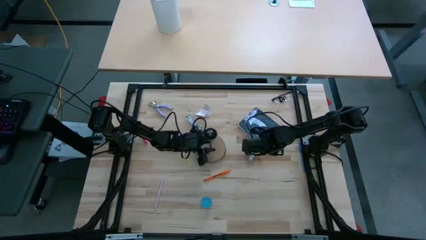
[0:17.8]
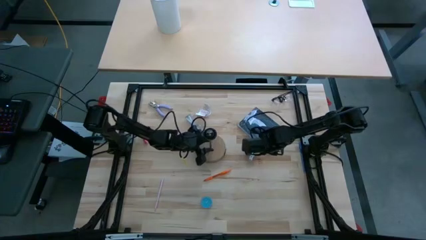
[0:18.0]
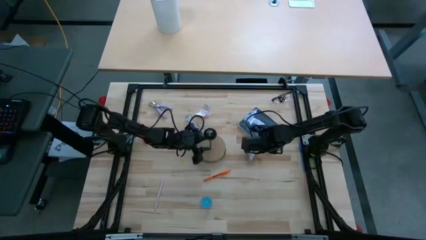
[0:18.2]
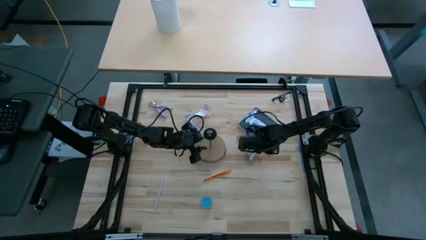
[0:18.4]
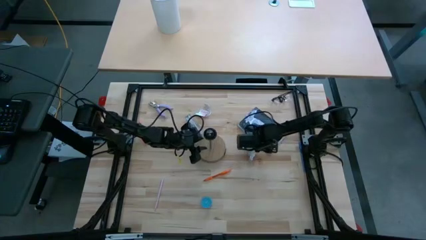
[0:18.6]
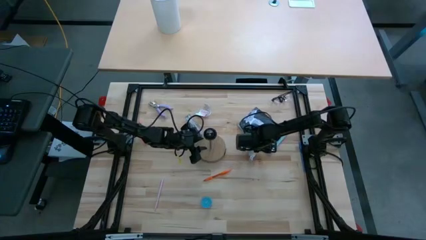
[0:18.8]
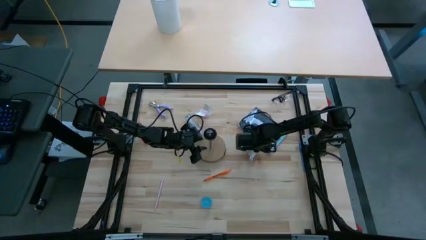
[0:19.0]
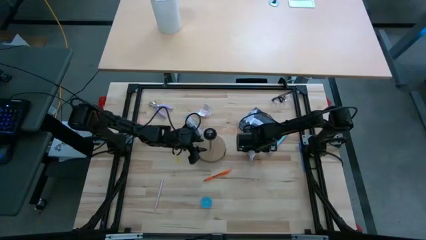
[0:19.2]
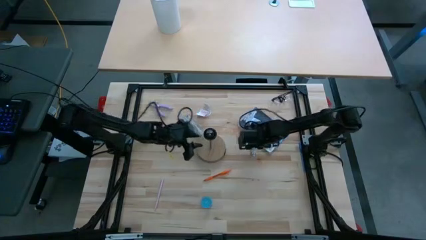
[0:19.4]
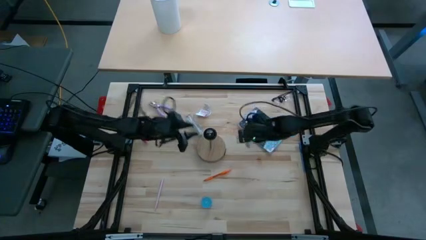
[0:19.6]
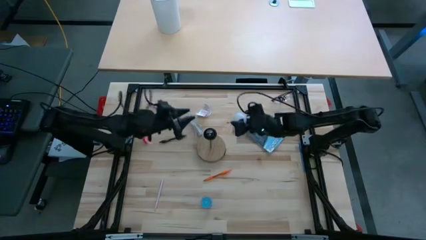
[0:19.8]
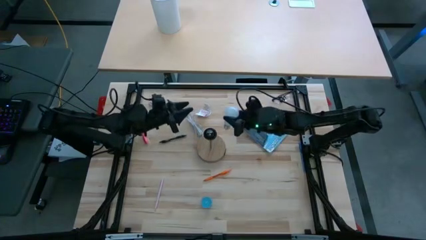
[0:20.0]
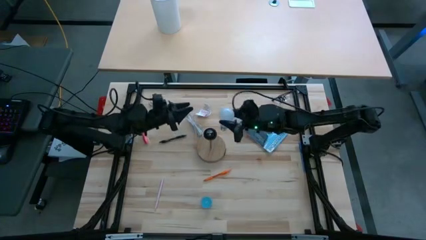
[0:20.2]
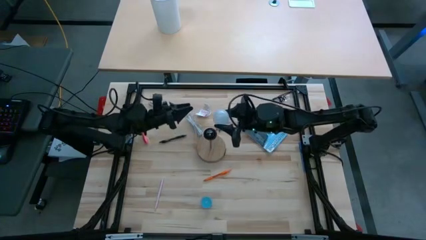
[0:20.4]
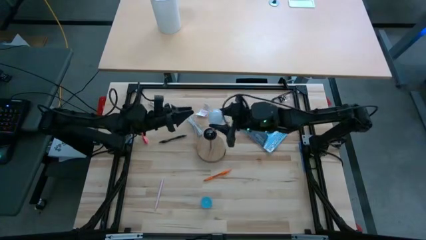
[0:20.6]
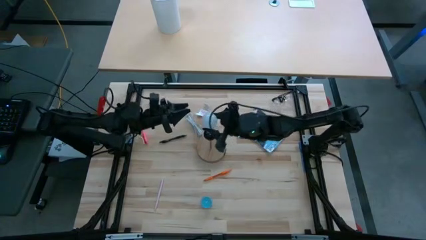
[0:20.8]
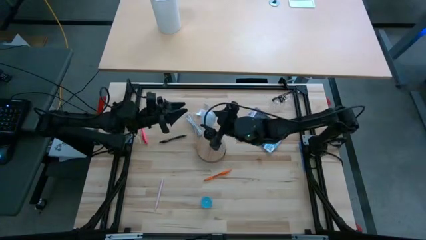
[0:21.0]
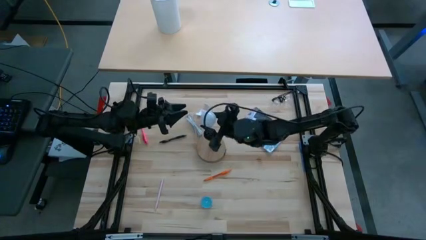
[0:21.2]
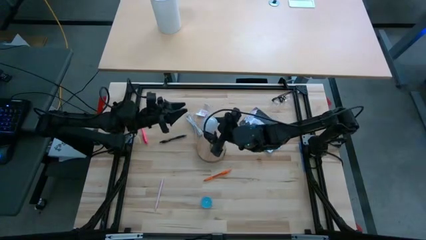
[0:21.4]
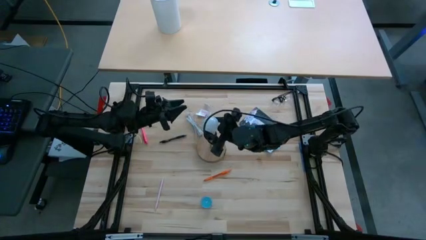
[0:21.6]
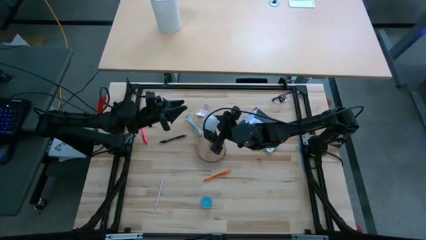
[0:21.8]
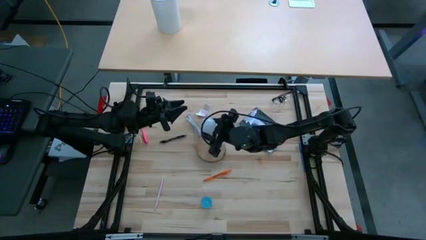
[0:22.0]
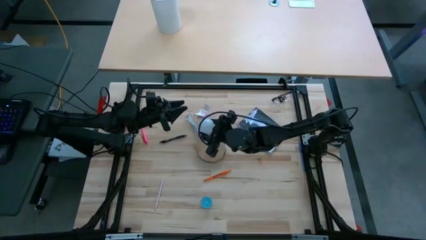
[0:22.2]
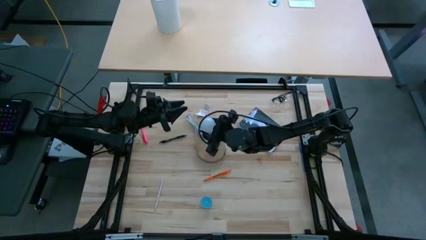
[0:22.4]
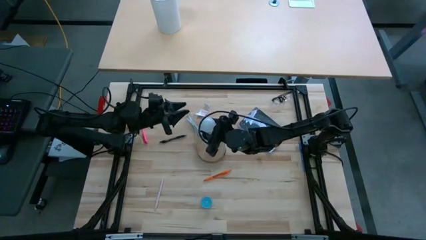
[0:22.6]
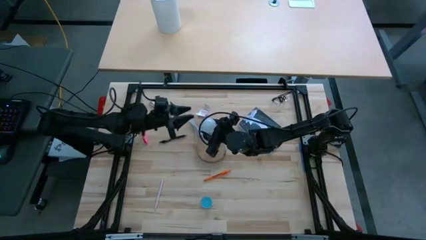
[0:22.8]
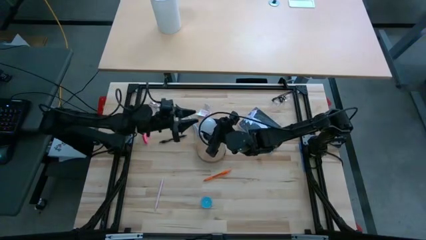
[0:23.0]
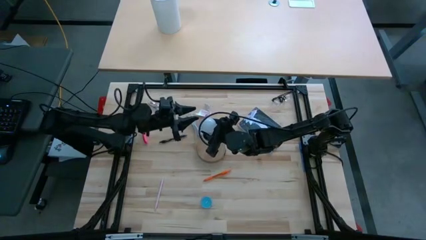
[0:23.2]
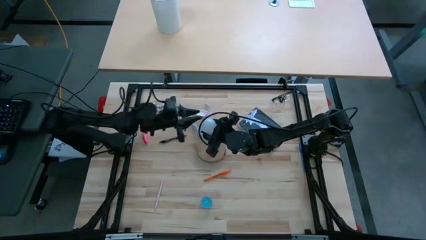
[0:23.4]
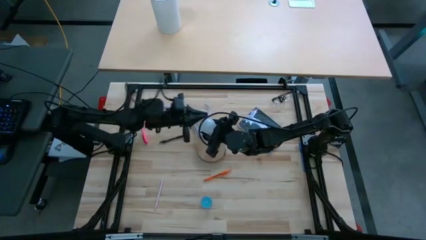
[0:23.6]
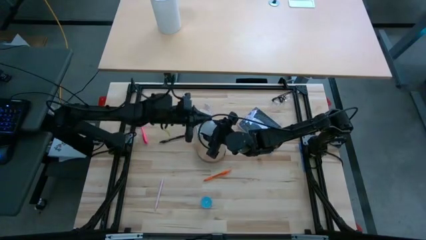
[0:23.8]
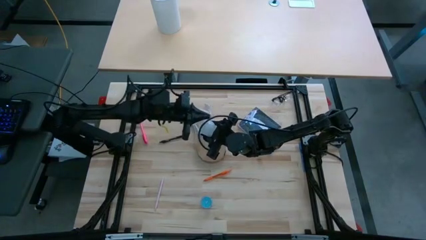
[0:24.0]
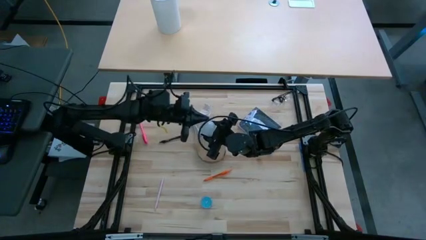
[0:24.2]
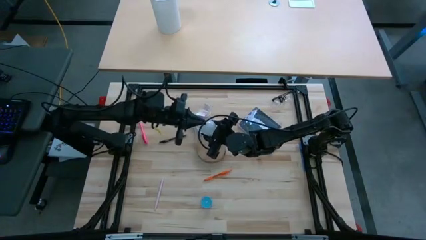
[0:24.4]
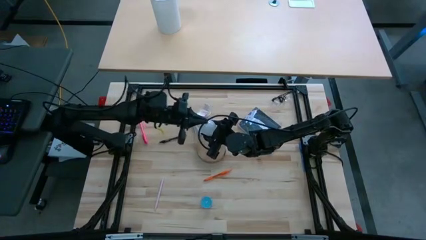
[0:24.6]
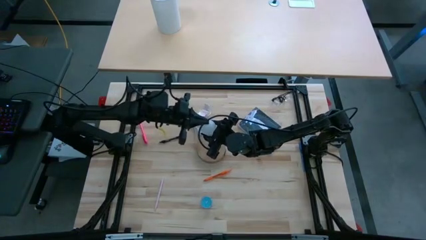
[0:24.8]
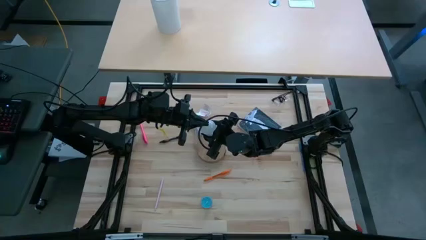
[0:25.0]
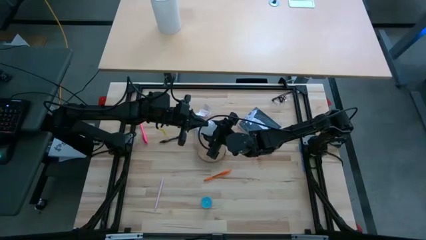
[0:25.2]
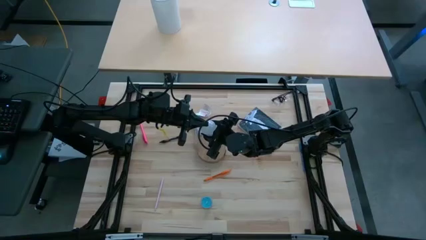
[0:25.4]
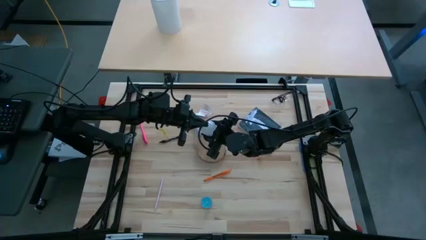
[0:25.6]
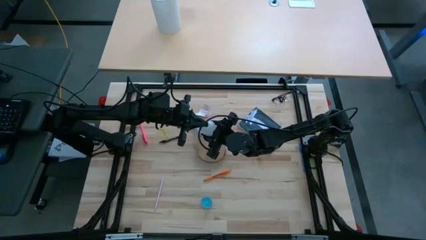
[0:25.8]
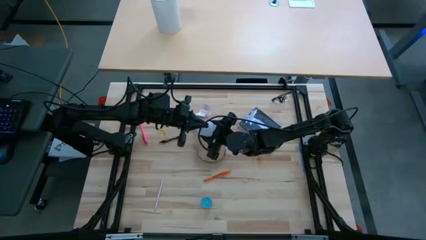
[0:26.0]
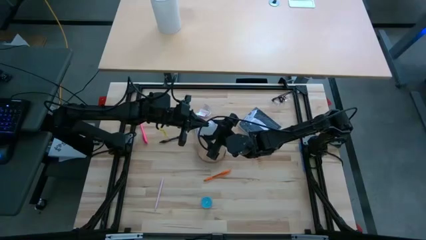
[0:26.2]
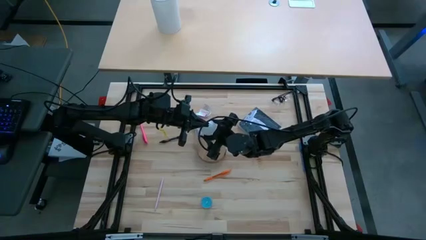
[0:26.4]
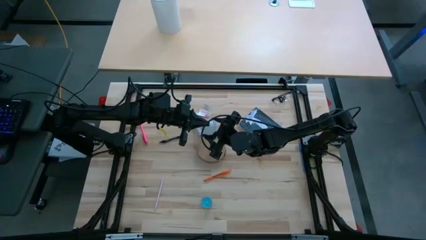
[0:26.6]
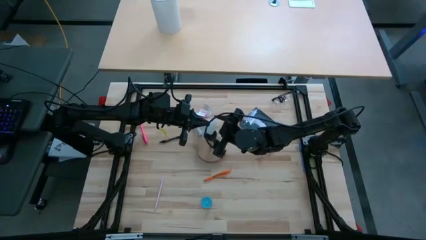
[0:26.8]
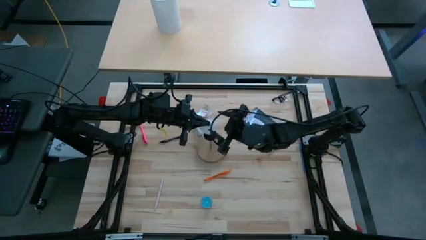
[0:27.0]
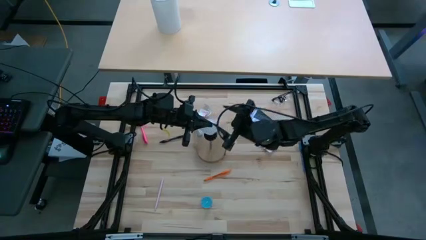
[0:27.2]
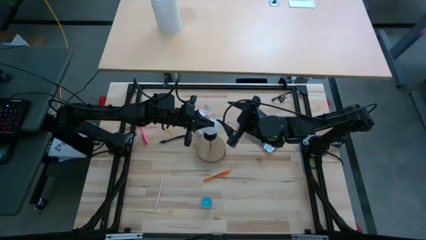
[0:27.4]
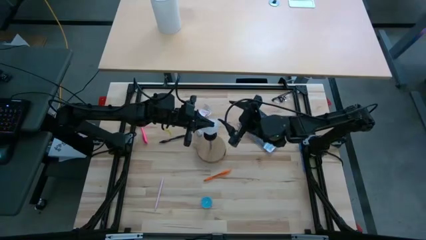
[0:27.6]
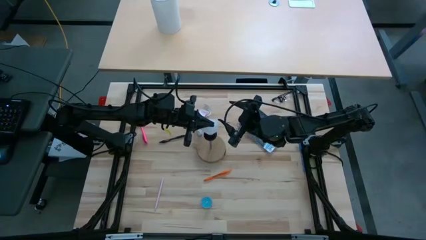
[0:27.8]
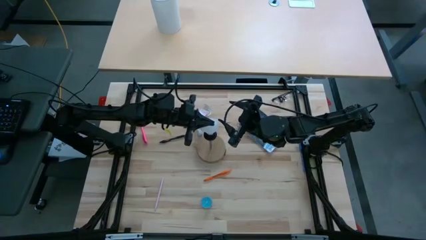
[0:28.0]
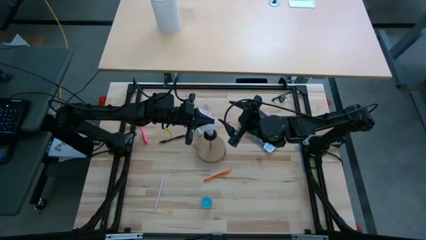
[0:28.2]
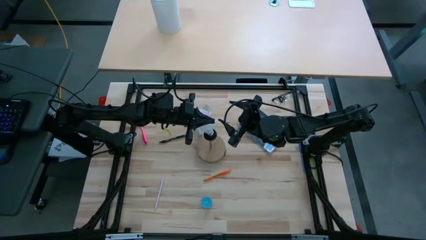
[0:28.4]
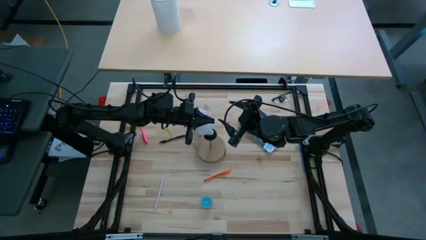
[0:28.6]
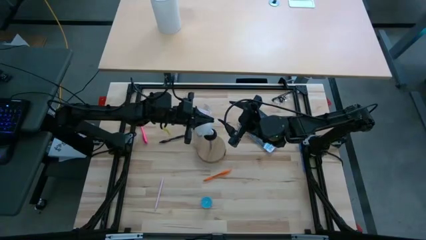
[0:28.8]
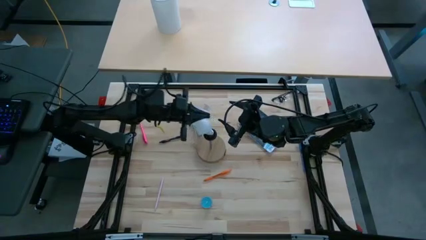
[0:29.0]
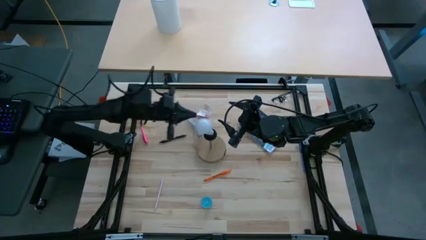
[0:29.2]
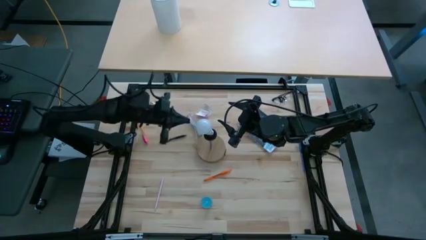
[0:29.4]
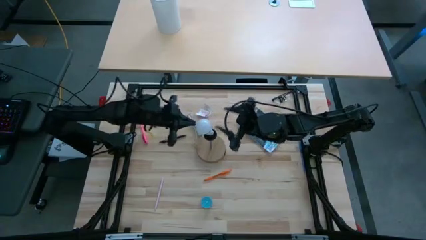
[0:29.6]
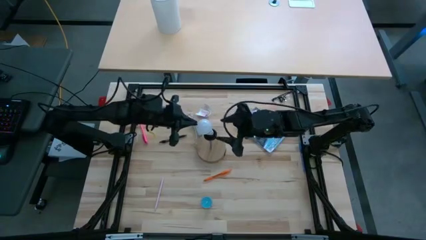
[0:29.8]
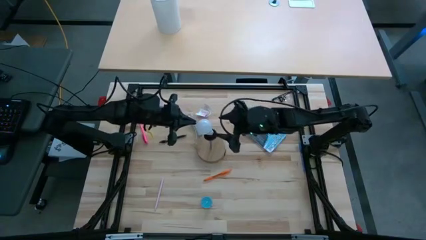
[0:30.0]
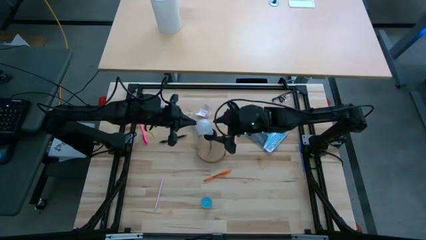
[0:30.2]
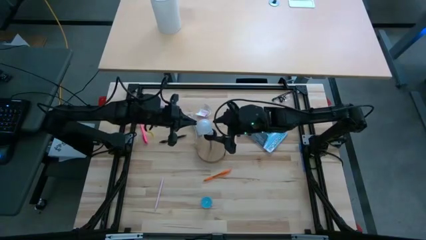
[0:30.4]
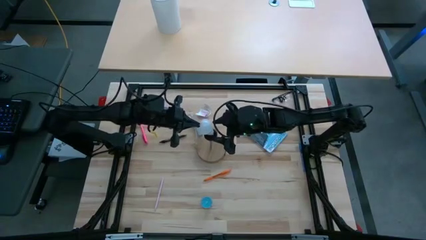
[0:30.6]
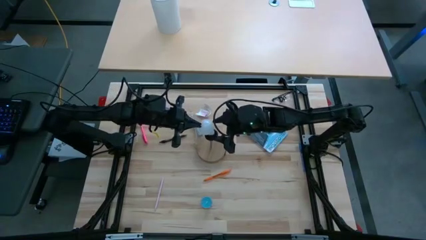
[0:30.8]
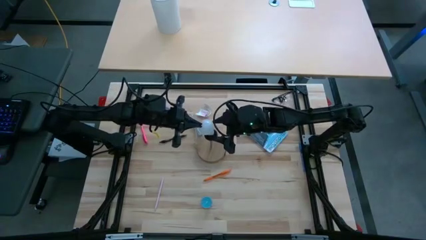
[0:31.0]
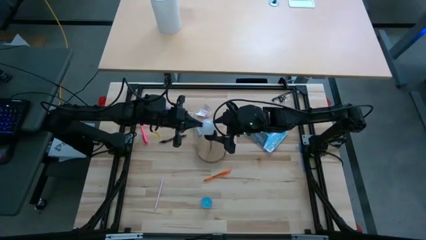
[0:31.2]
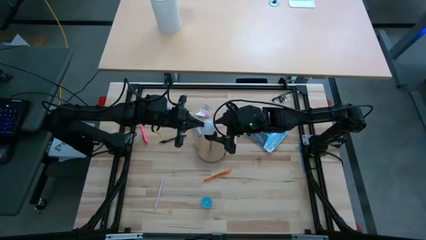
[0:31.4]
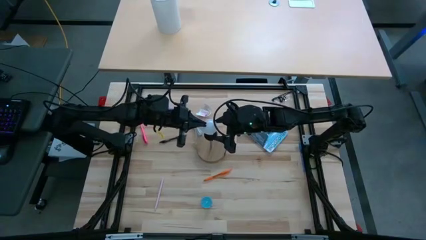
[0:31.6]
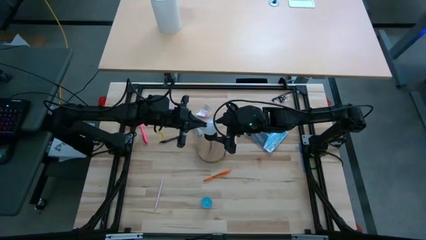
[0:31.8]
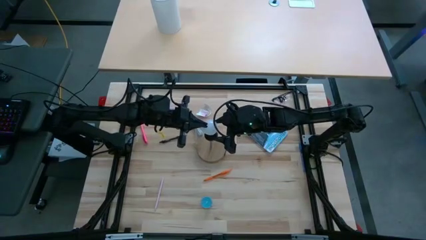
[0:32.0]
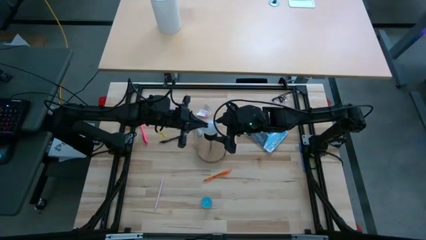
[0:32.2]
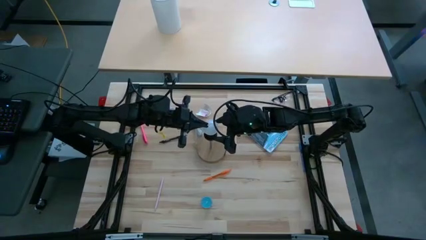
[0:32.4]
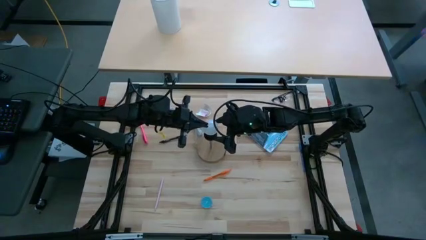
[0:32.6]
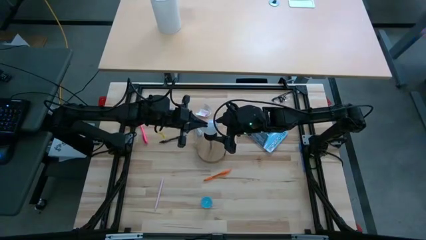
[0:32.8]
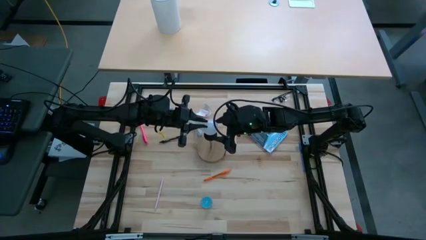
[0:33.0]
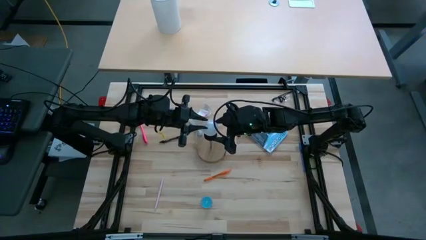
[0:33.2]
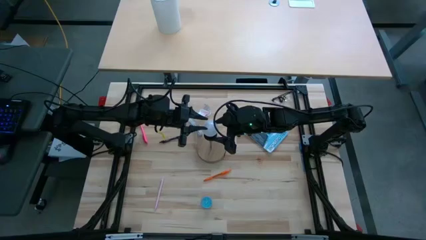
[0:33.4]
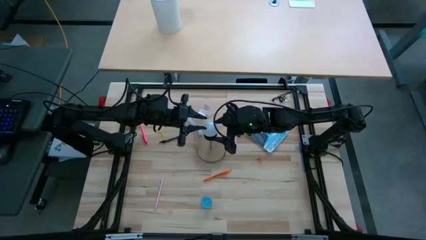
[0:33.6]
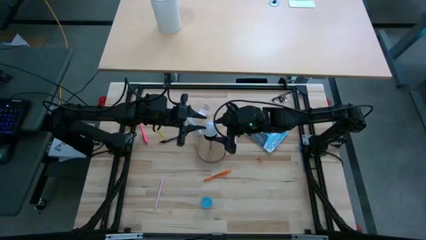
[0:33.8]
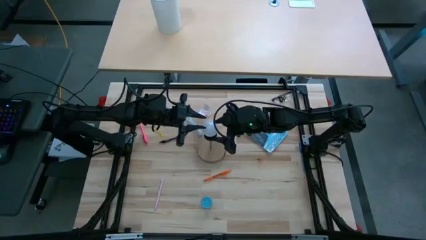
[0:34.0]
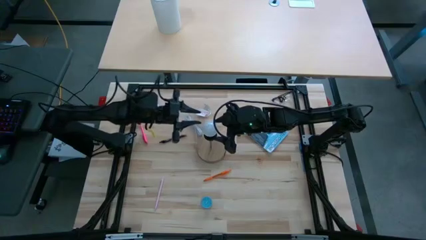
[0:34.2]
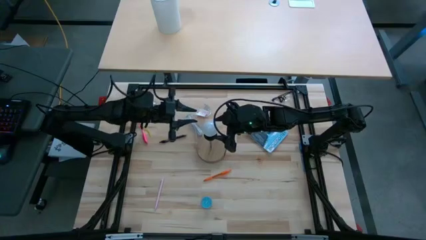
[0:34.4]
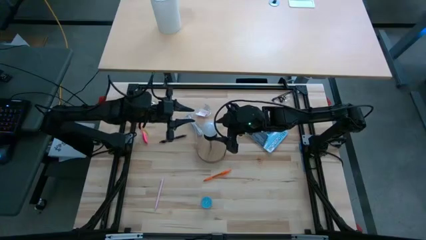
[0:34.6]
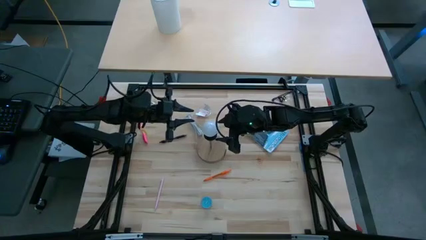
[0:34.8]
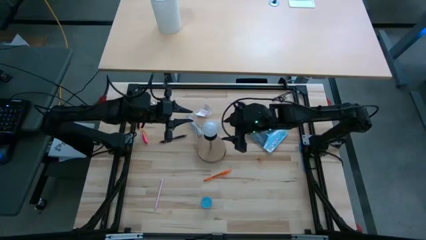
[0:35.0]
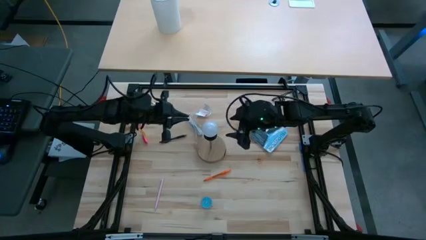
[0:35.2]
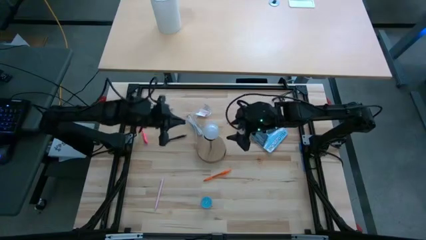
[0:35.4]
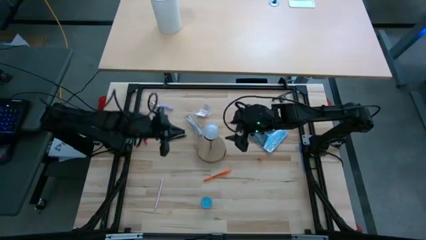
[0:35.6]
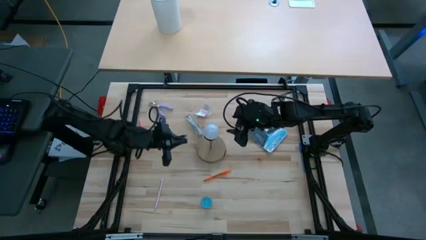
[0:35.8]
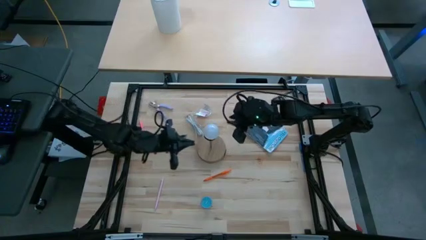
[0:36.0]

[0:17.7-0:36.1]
Task: Screw lightbulb
Insert the light bulb into the lamp
